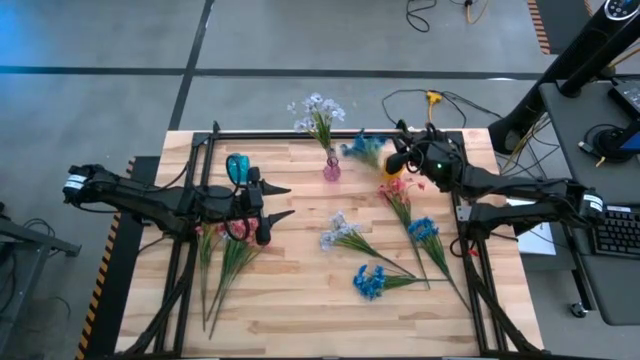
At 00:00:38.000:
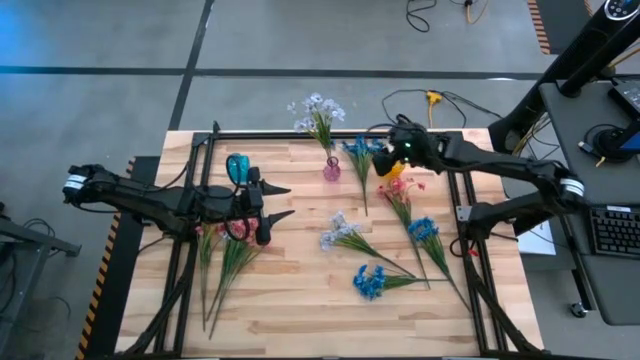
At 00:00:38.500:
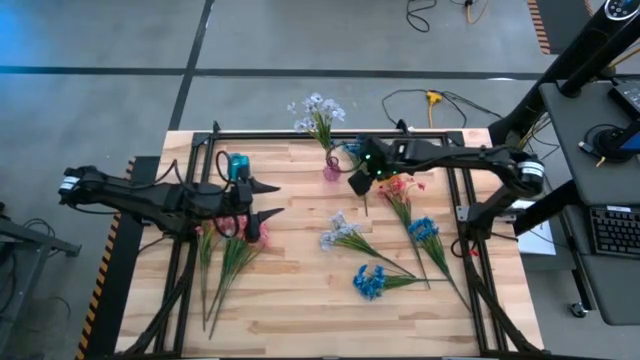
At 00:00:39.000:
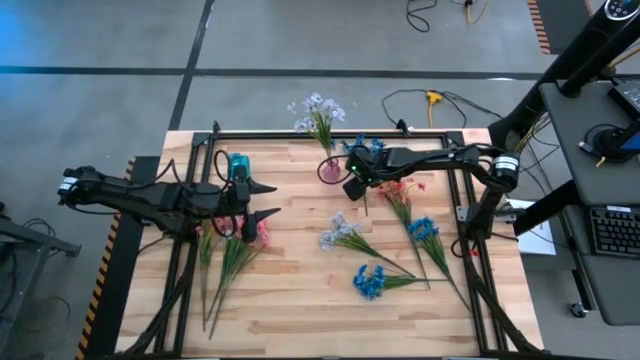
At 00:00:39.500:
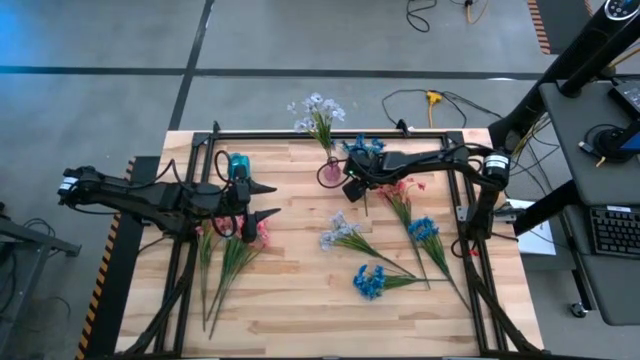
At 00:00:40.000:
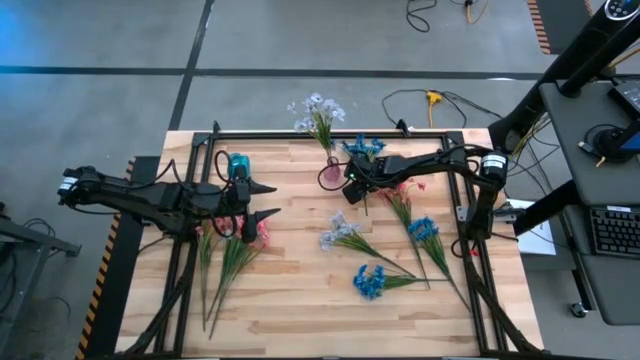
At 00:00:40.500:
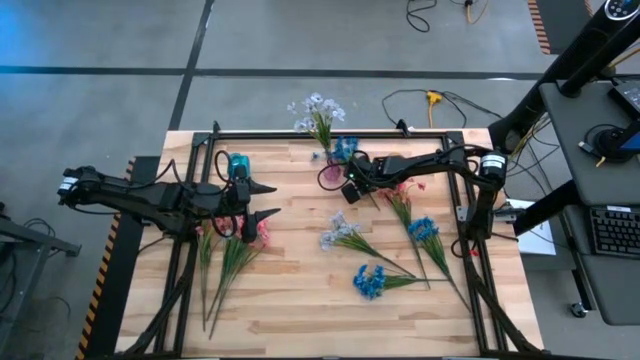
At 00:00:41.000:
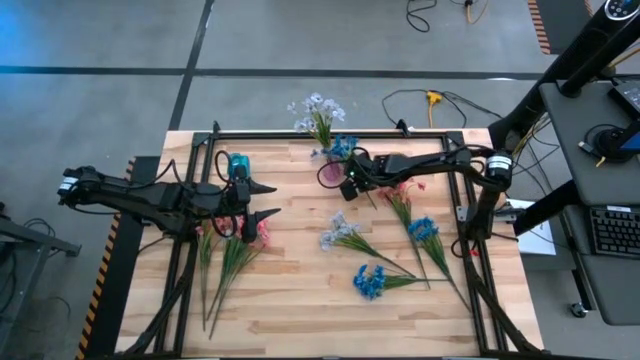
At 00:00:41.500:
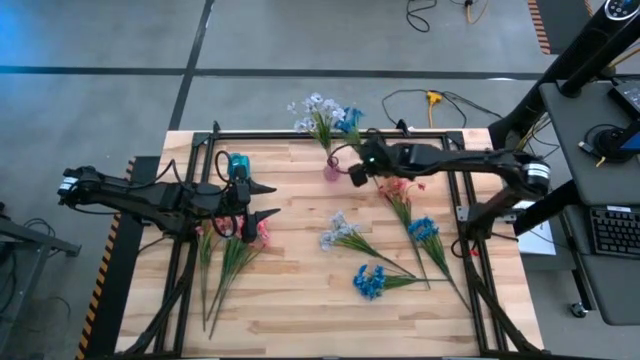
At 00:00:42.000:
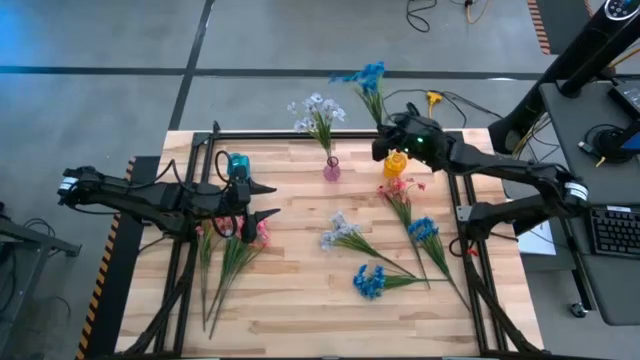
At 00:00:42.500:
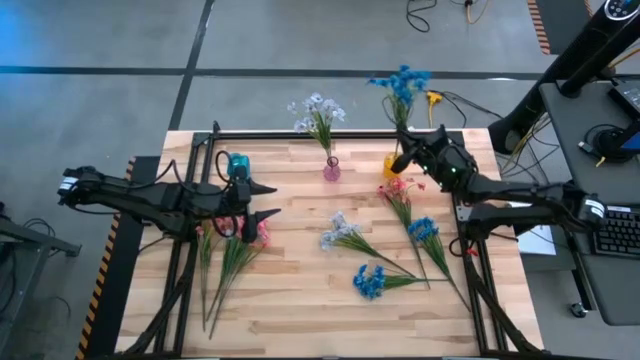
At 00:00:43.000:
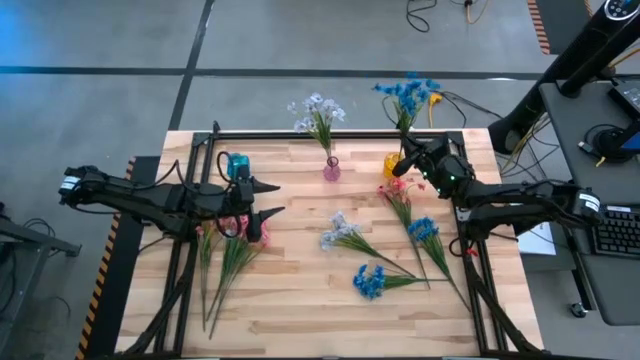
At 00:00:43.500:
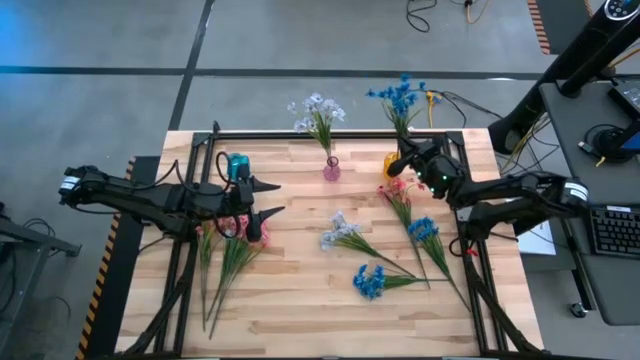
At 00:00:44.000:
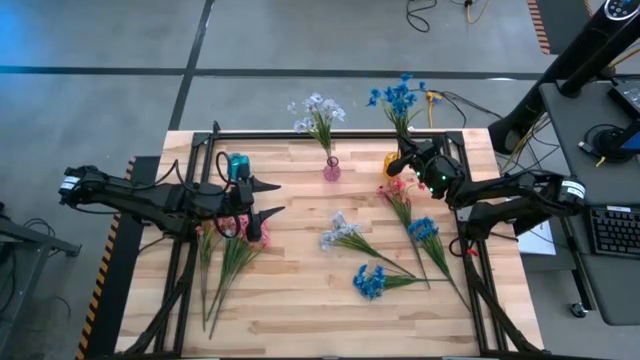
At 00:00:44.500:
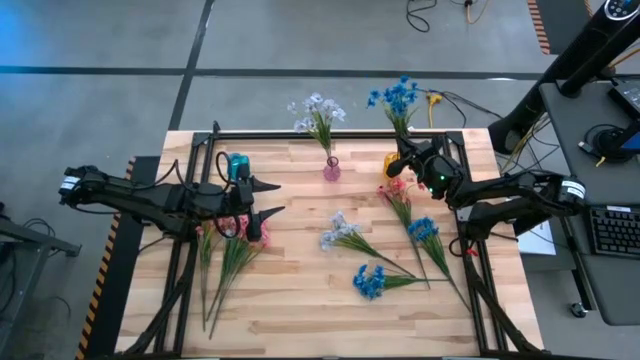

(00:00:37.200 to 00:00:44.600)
Task: Sort flowers into vase by color
Put the top blue flowers into the yellow vase

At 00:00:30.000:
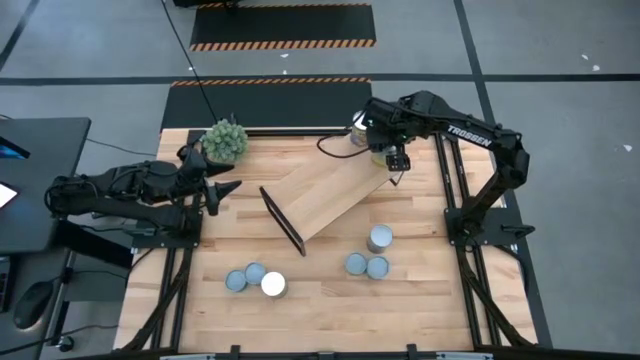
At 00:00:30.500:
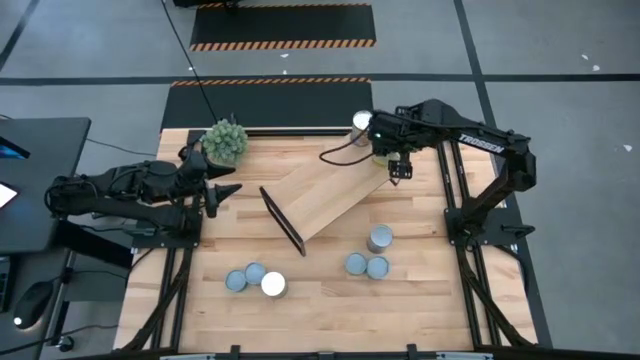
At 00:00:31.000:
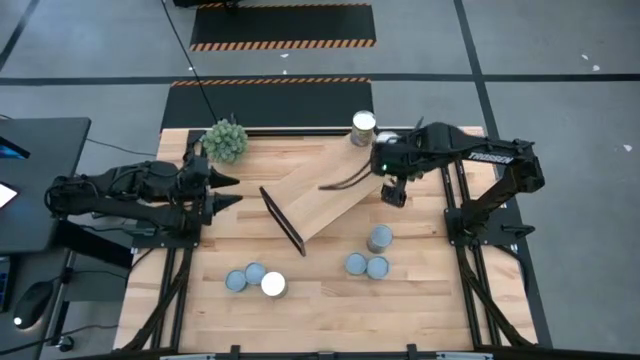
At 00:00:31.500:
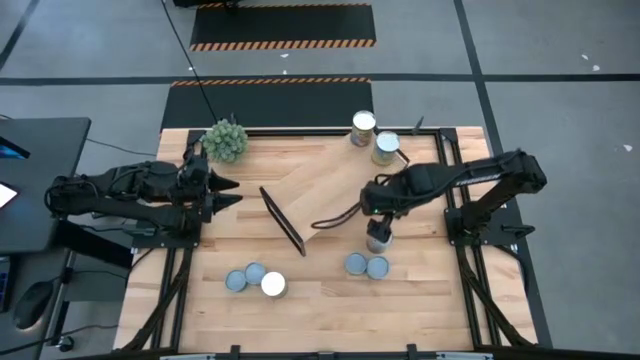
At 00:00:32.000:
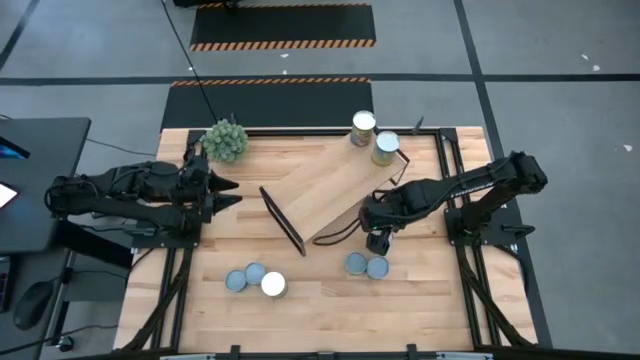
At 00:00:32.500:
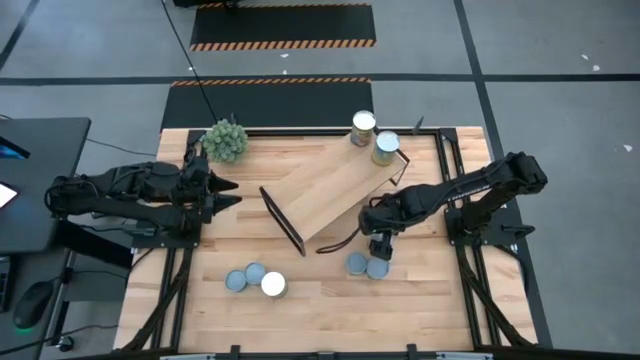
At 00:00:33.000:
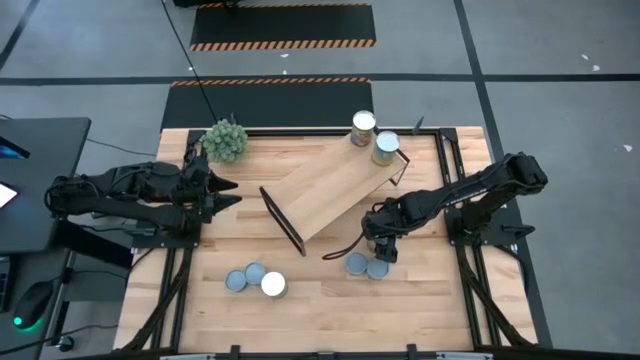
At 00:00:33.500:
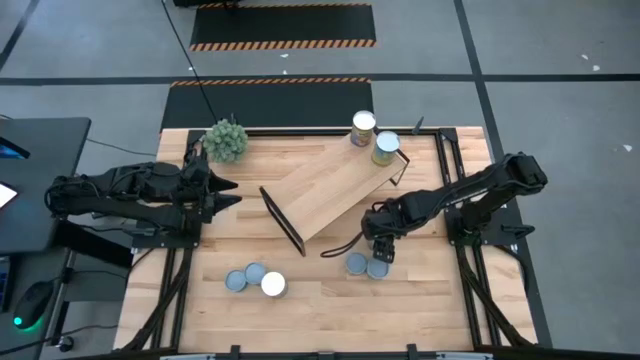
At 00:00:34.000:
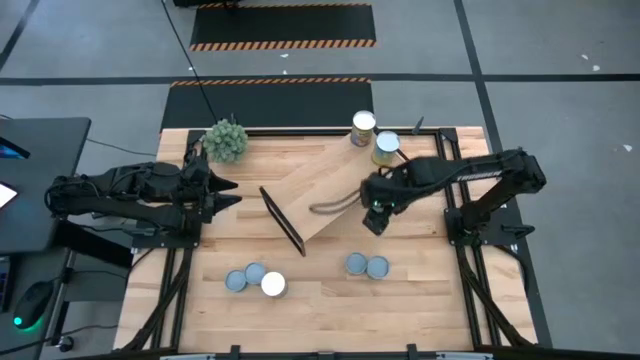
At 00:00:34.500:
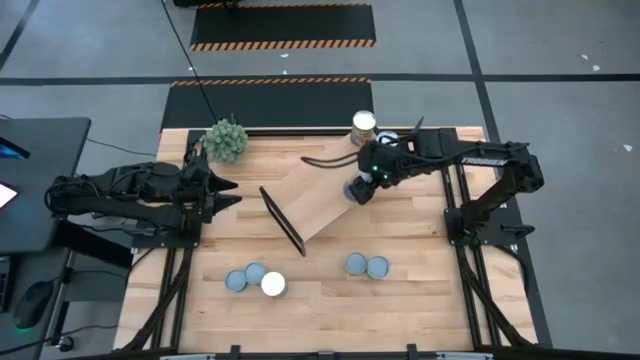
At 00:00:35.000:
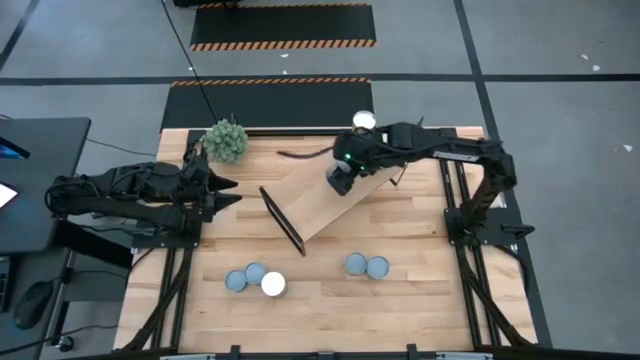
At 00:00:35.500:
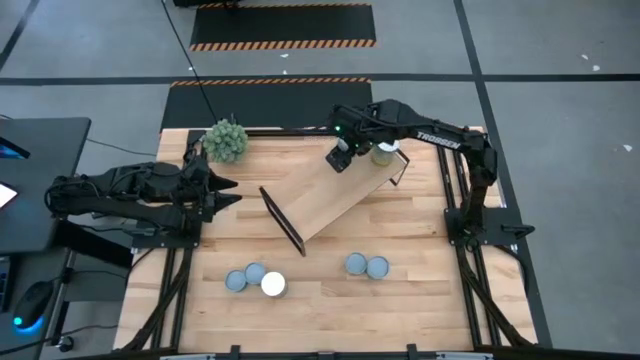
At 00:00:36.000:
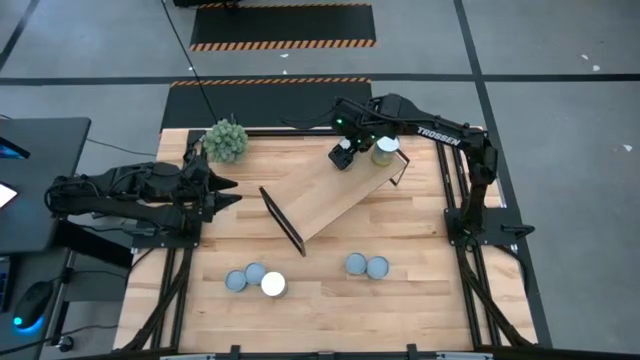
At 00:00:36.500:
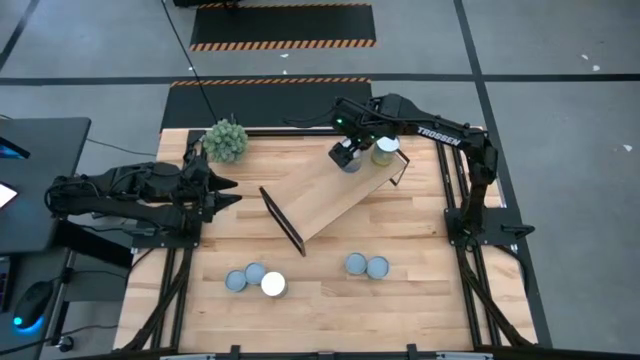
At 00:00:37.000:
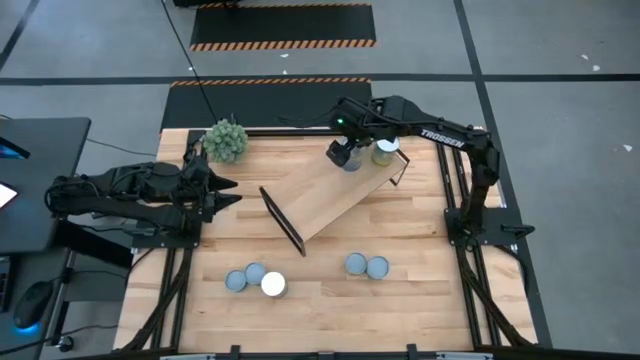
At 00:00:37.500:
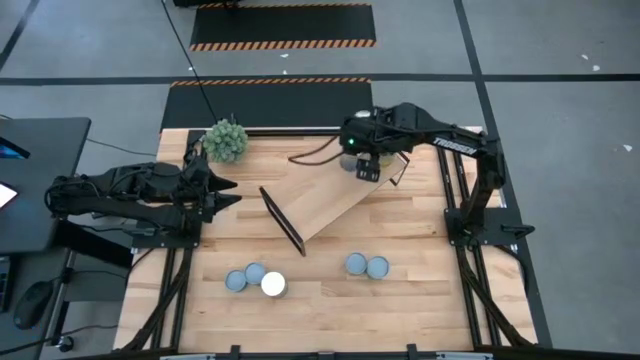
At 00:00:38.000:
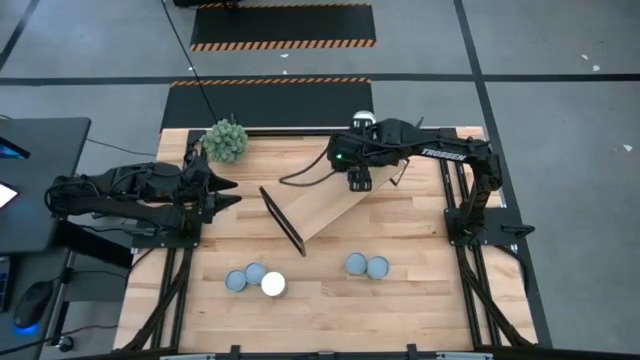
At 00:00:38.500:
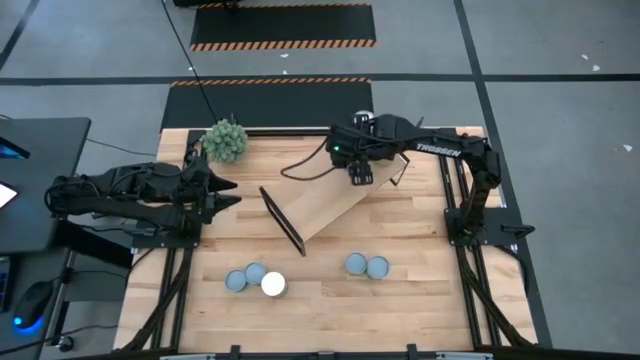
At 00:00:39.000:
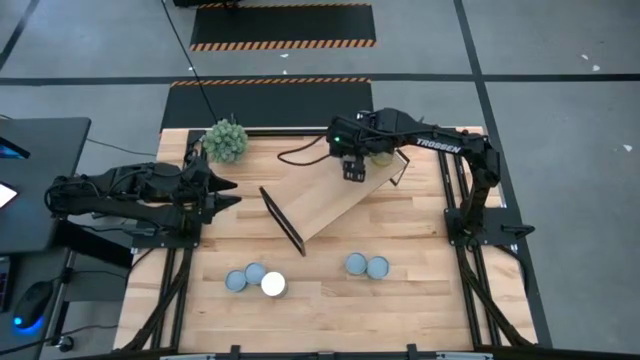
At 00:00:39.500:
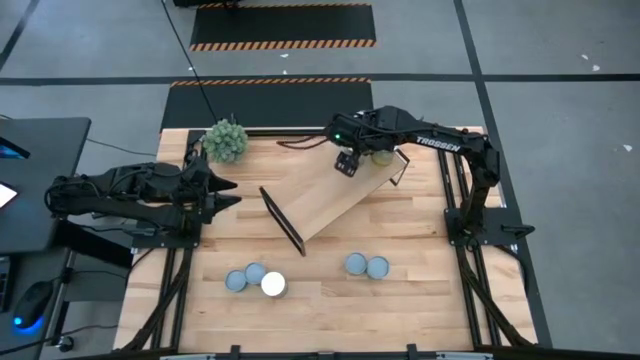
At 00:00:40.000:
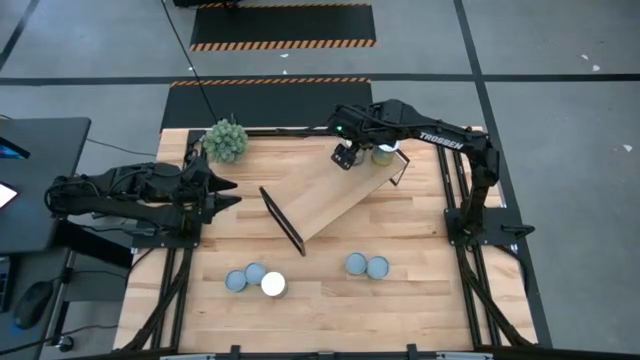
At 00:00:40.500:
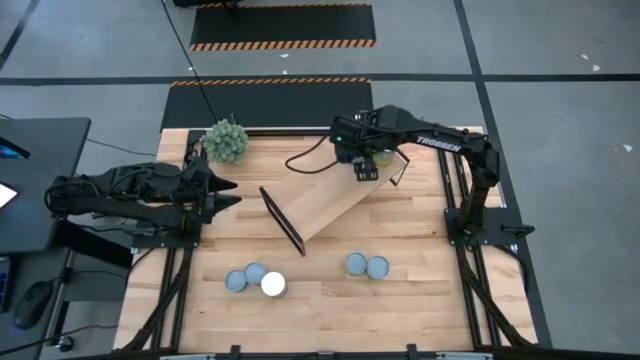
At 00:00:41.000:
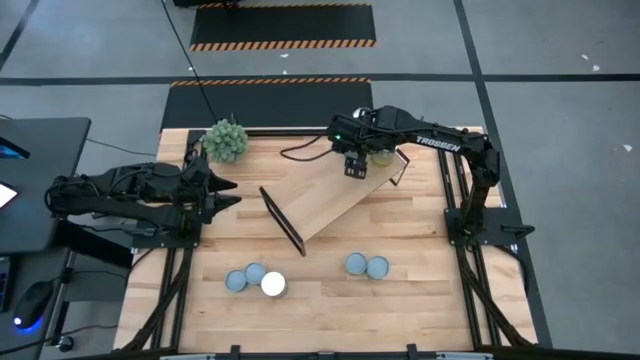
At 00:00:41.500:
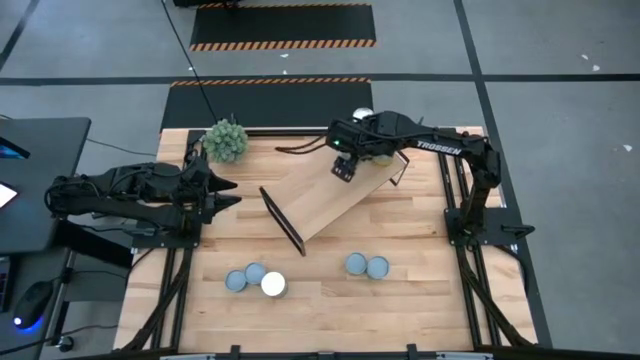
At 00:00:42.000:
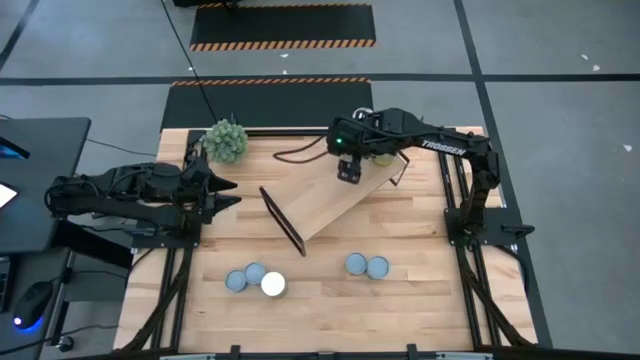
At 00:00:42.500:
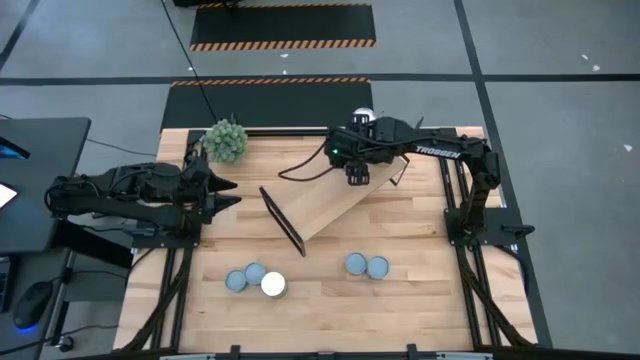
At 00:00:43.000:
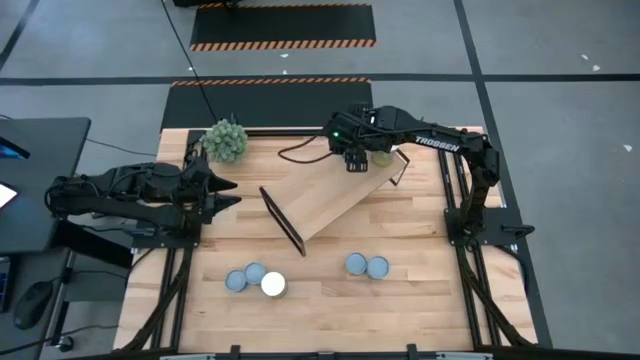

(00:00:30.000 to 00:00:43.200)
Task: Pick and place cans onto a shelf
Put the canned peas on the shelf

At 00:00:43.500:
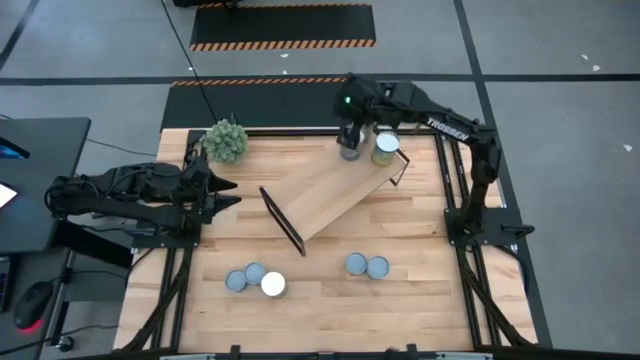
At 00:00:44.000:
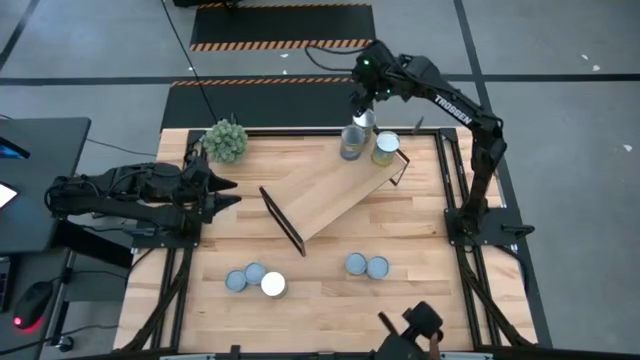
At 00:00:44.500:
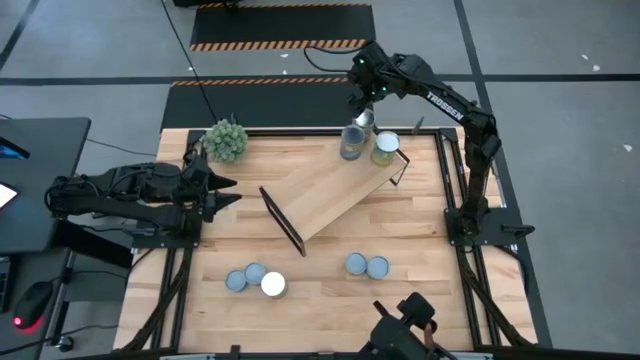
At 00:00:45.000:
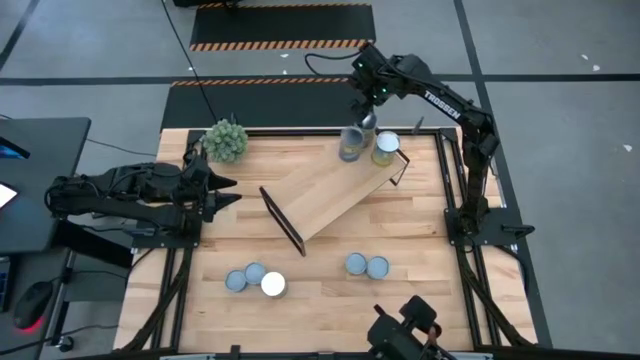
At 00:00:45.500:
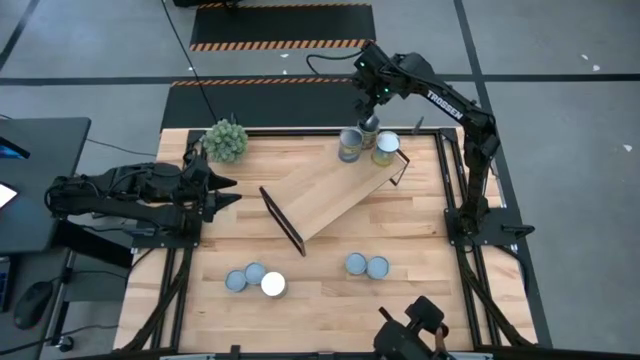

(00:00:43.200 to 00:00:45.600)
Adjust the canned peaches on the shelf
